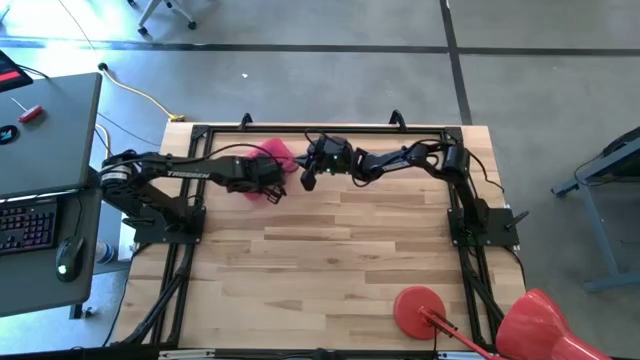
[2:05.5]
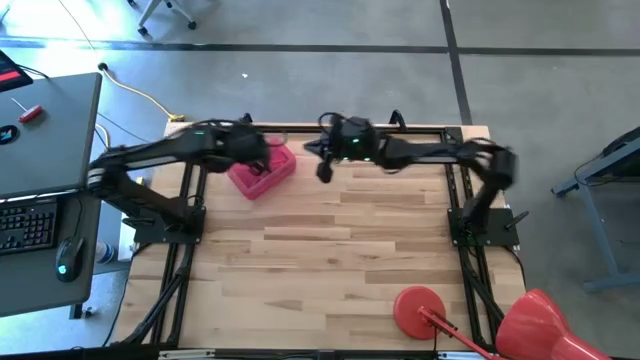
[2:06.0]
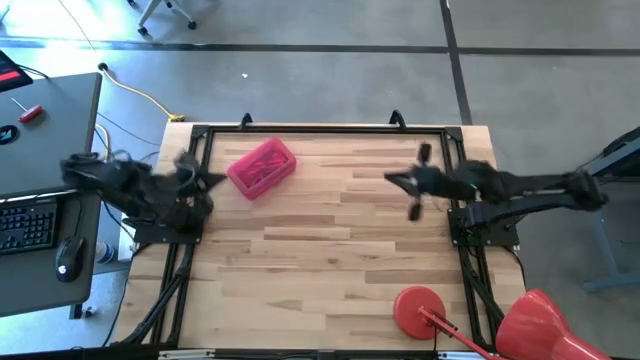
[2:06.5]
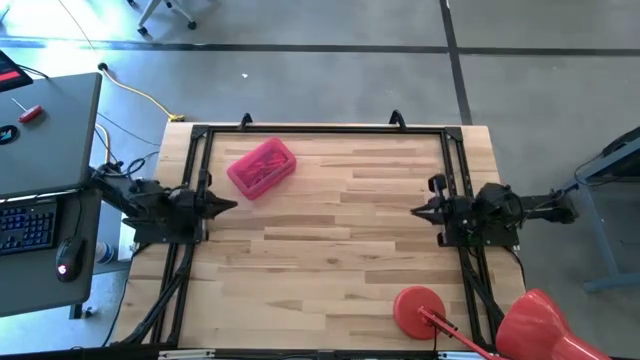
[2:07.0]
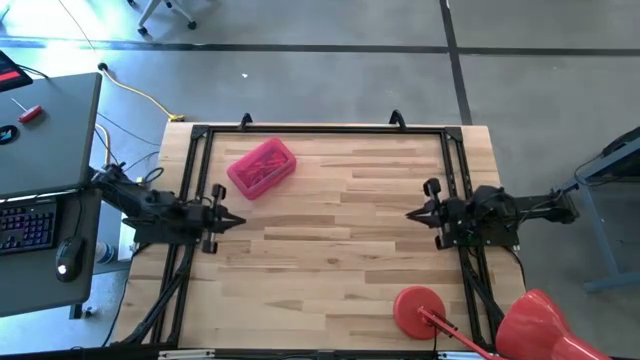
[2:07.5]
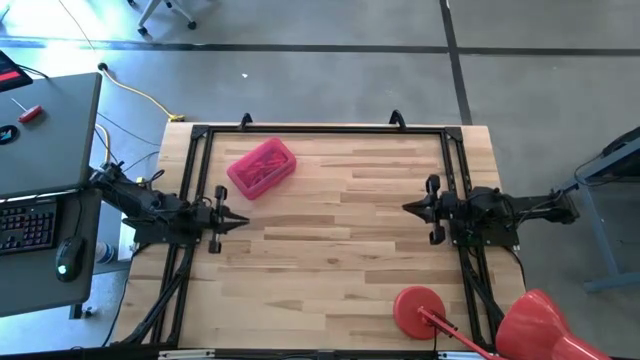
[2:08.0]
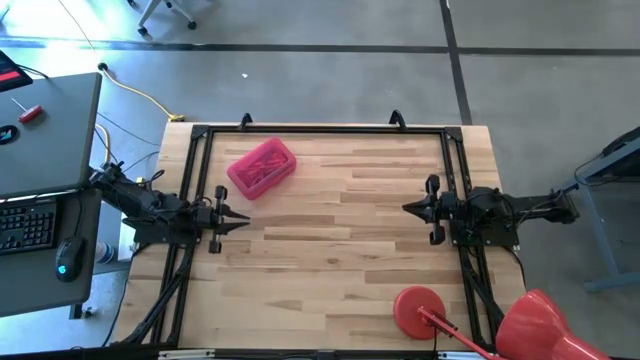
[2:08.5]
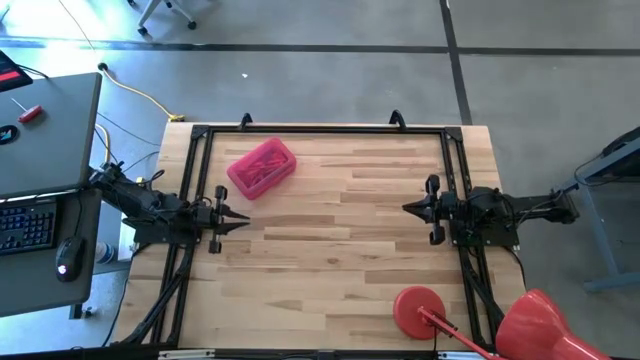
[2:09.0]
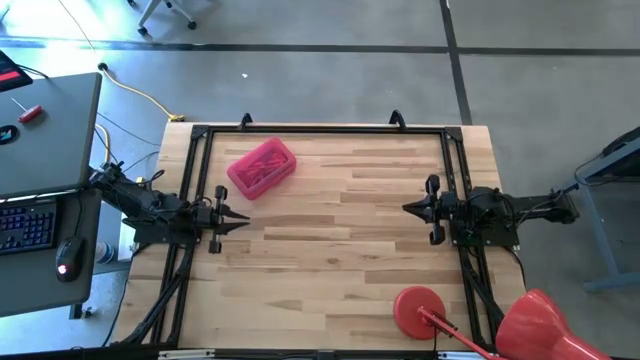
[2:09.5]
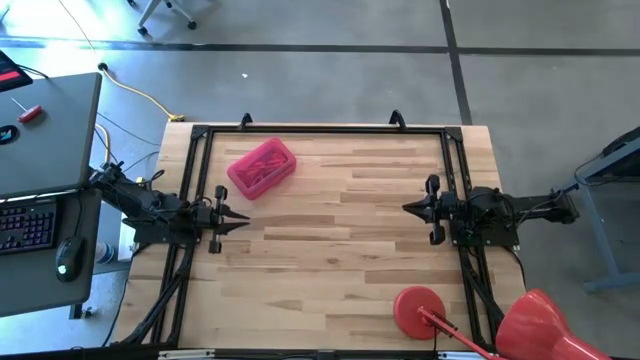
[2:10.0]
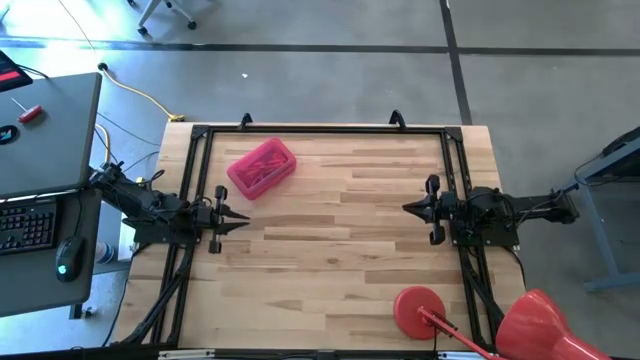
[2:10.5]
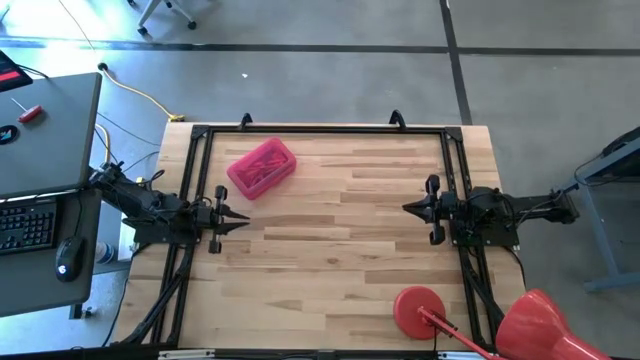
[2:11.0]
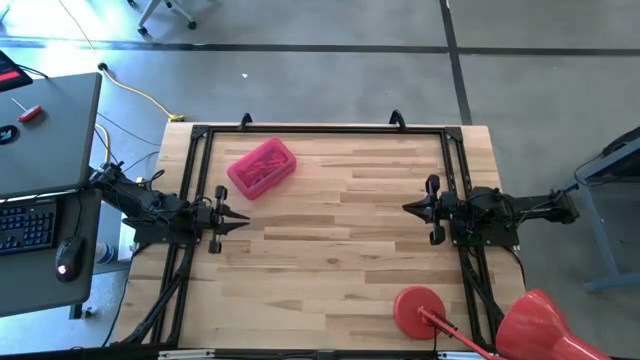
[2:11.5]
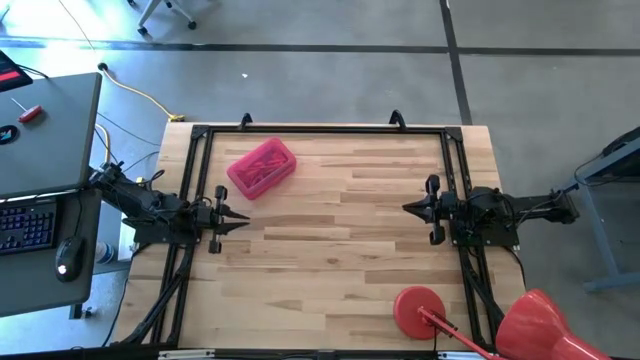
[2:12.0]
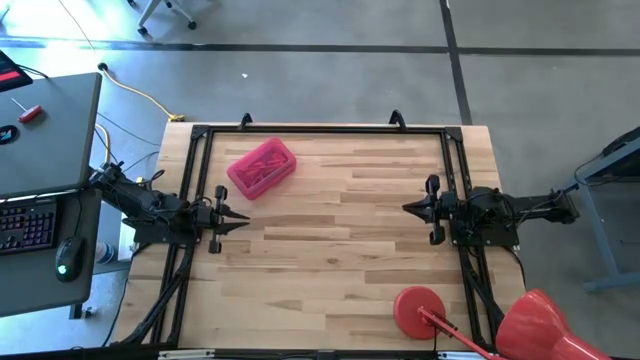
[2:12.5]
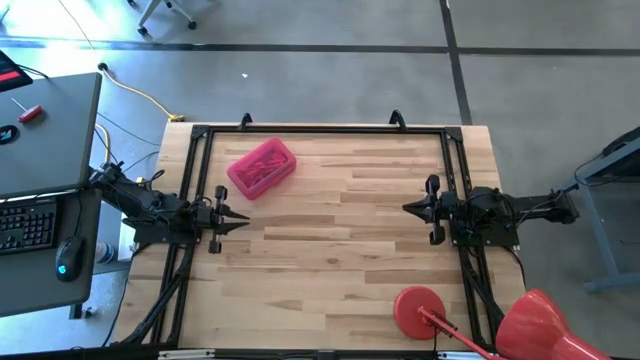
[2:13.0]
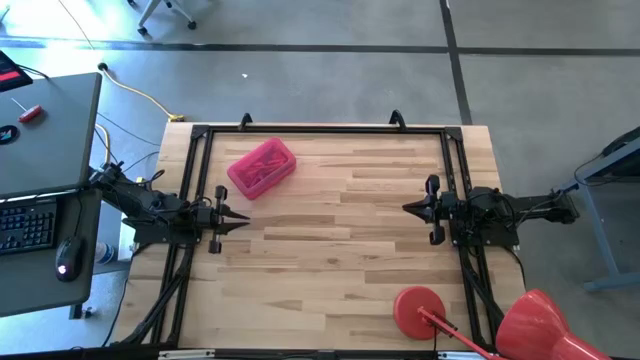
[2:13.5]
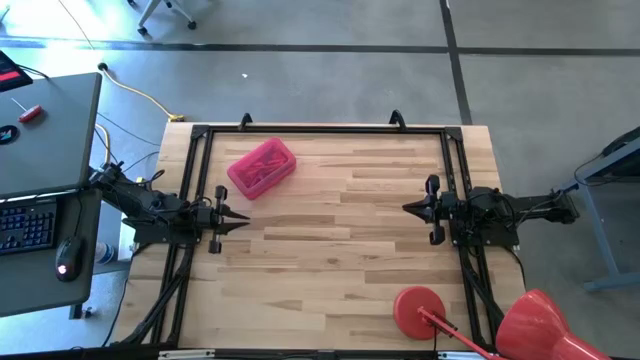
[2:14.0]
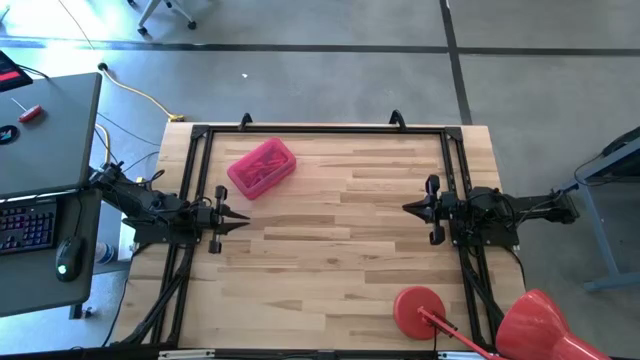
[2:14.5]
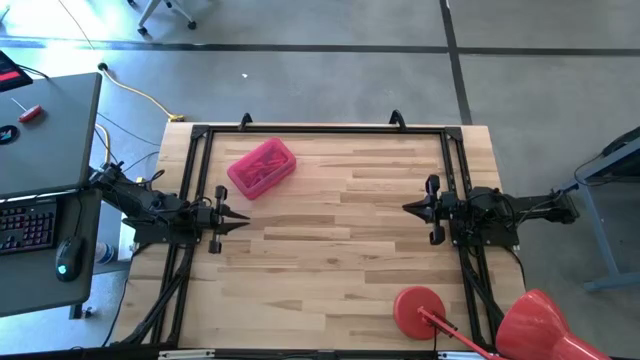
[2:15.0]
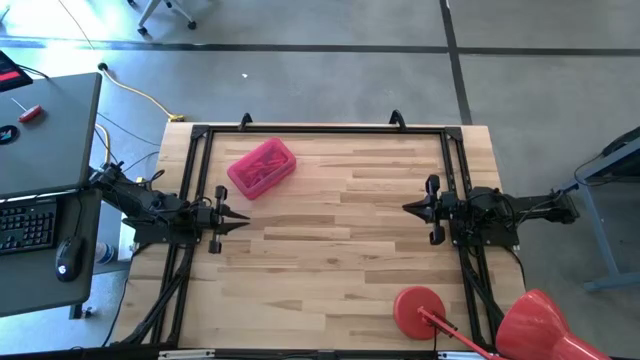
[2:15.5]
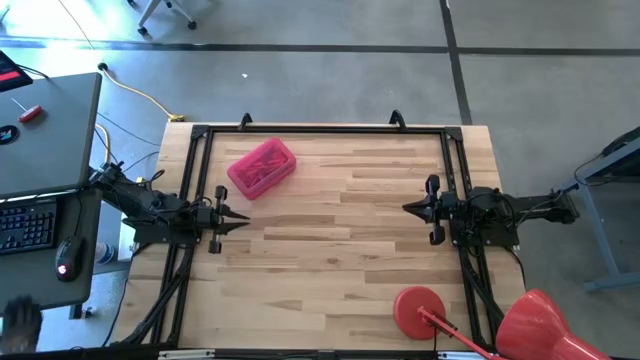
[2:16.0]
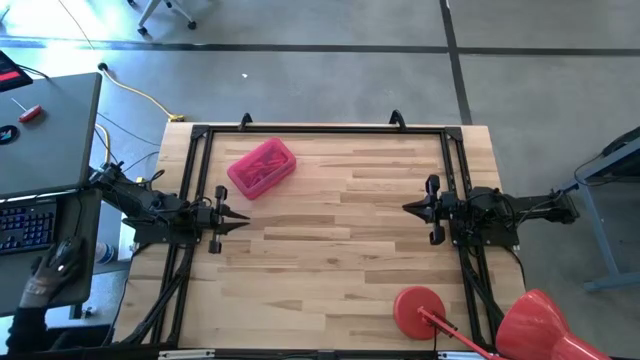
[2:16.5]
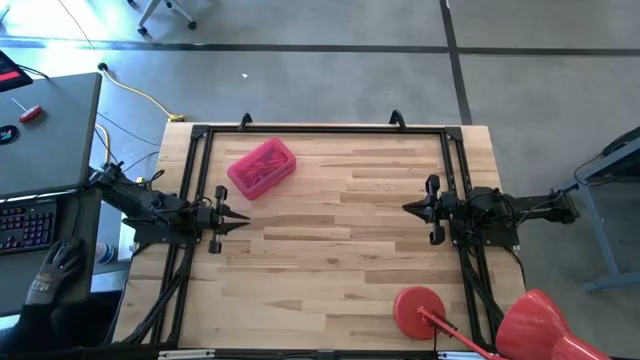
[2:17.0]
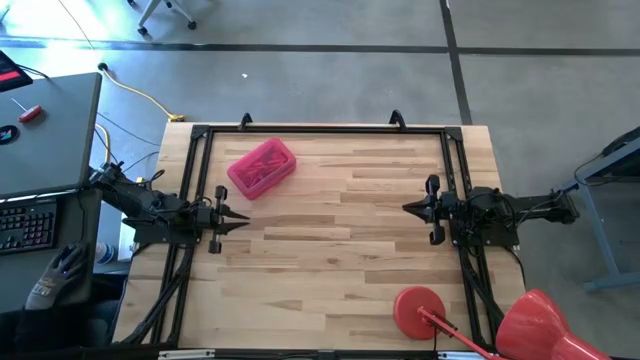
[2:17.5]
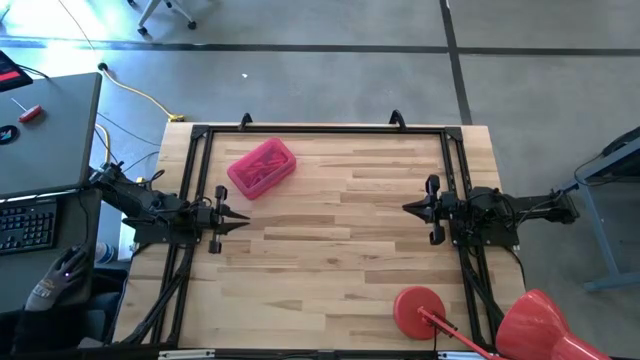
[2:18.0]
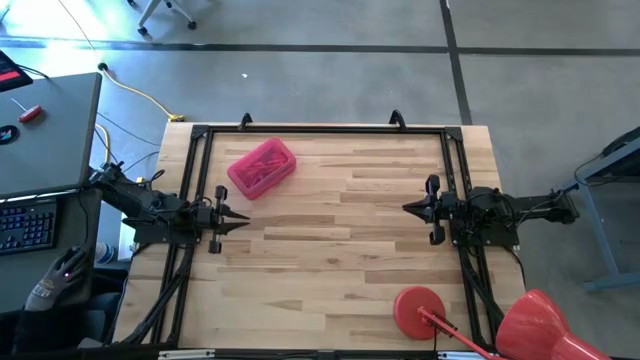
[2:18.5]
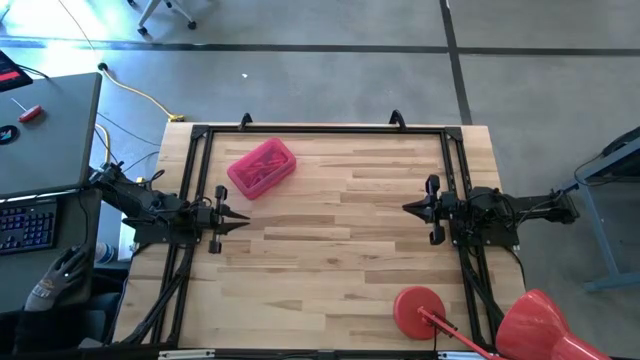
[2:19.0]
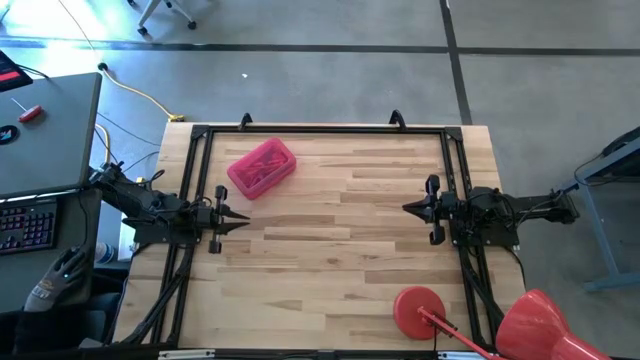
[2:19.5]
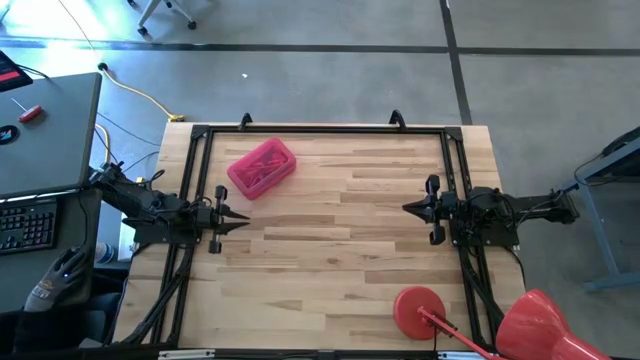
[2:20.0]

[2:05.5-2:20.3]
Task: Pick & place school supplies into a supply box
Return to Home Position

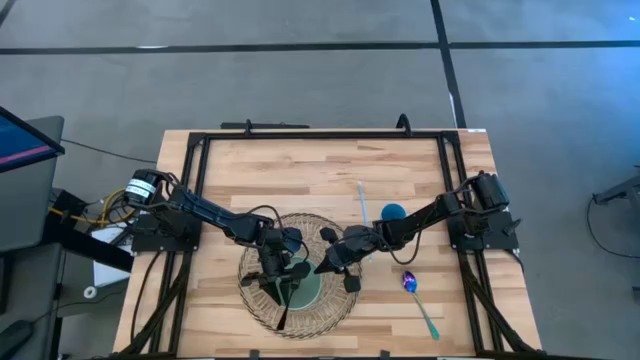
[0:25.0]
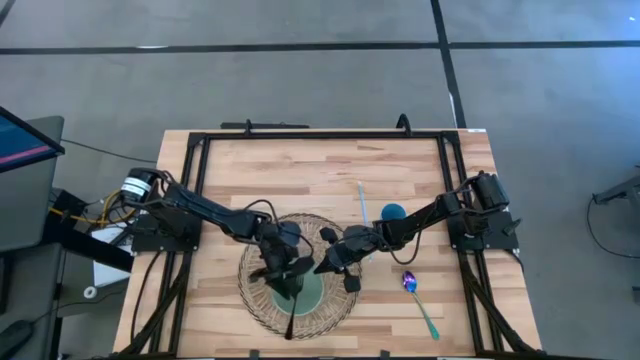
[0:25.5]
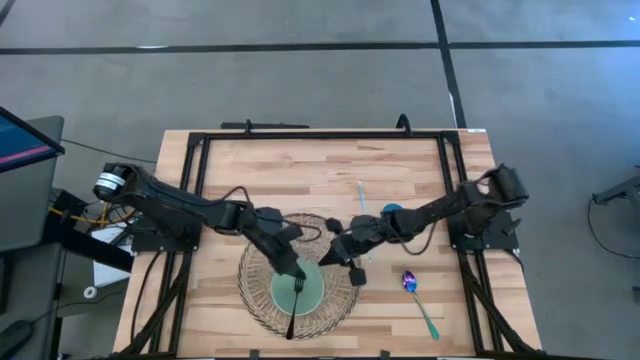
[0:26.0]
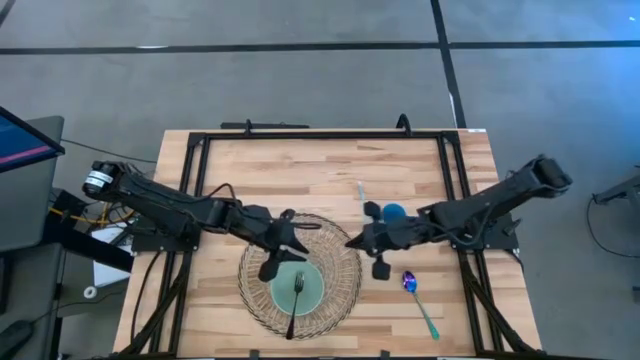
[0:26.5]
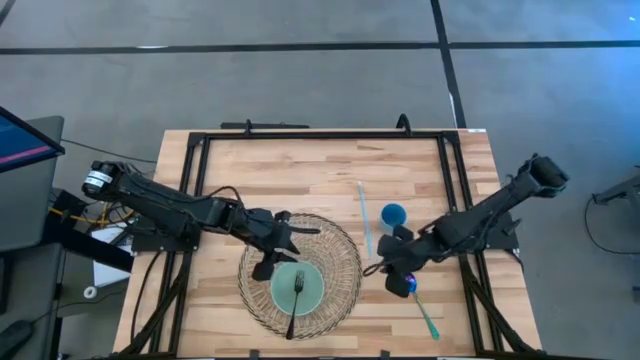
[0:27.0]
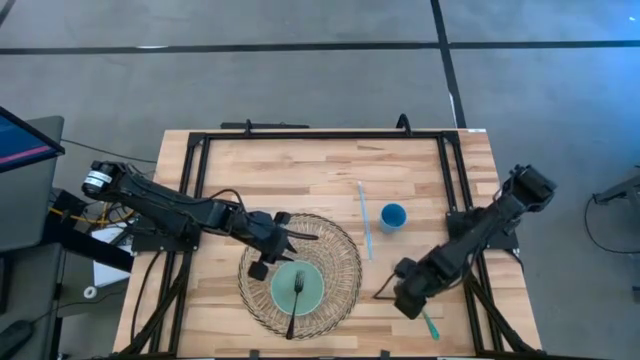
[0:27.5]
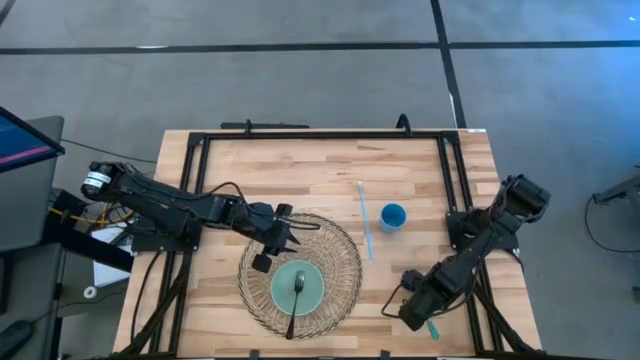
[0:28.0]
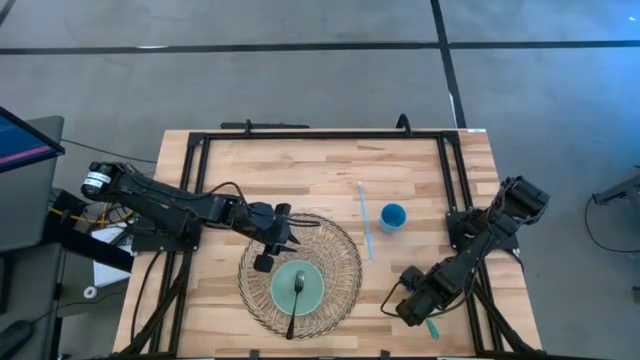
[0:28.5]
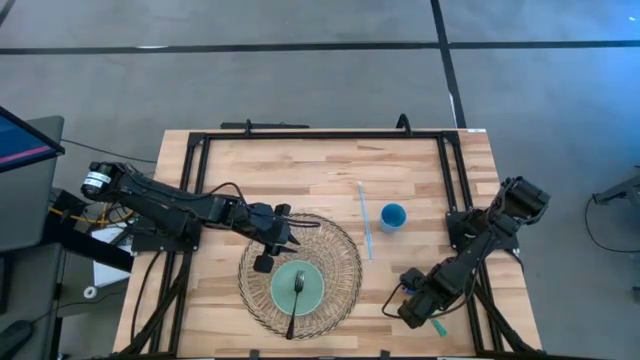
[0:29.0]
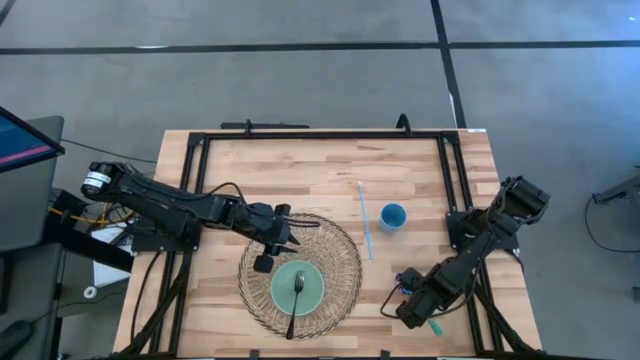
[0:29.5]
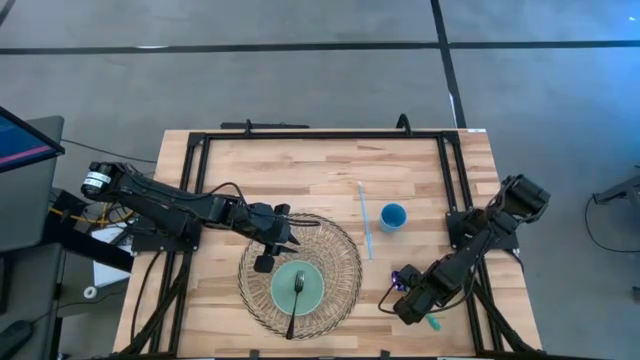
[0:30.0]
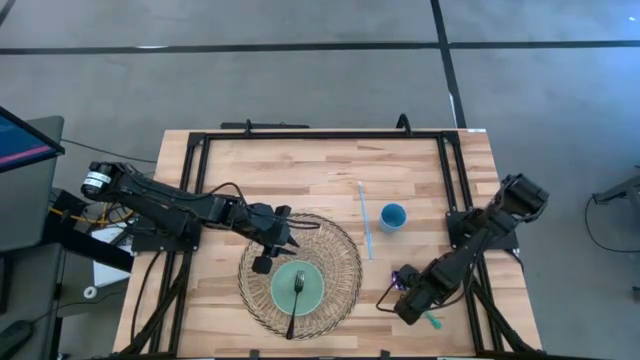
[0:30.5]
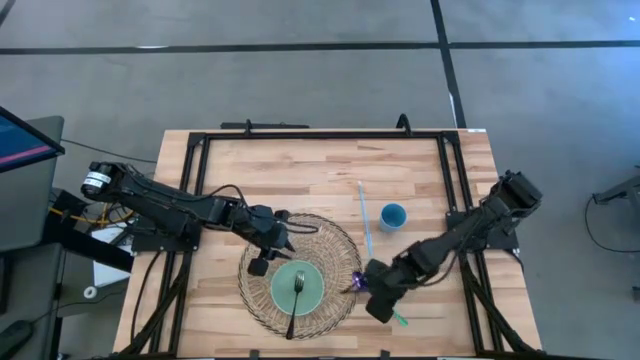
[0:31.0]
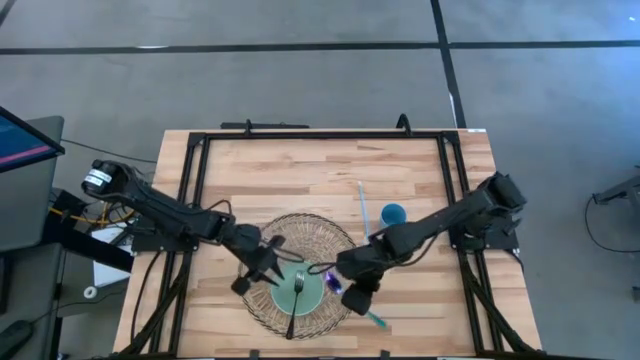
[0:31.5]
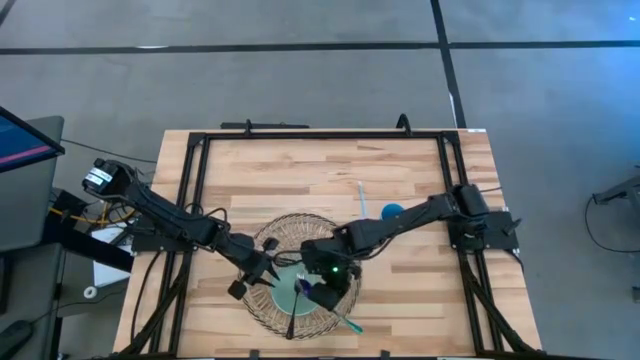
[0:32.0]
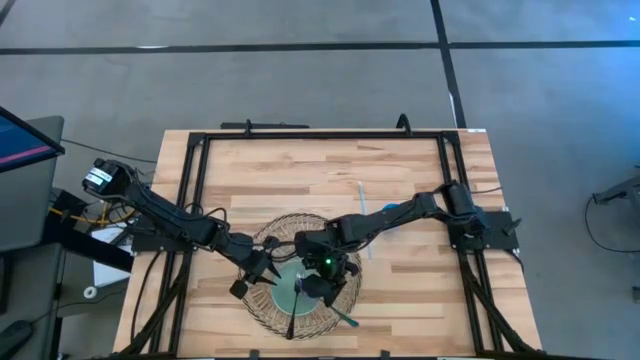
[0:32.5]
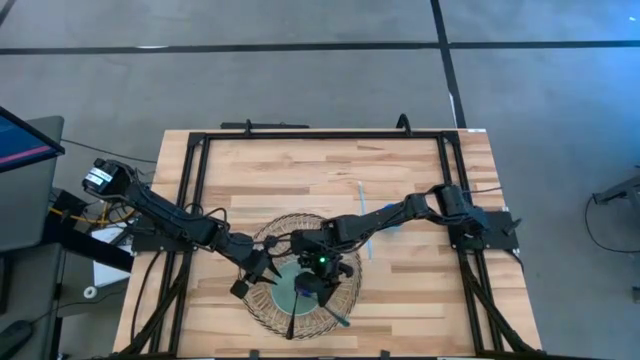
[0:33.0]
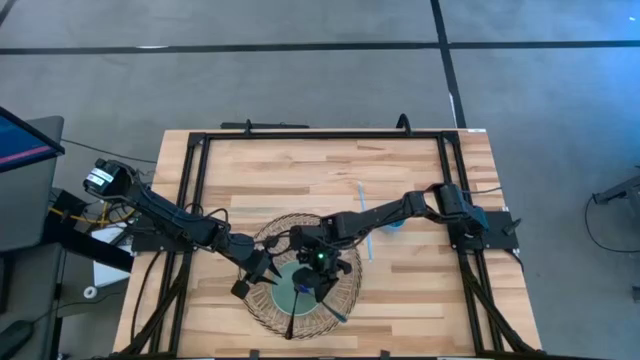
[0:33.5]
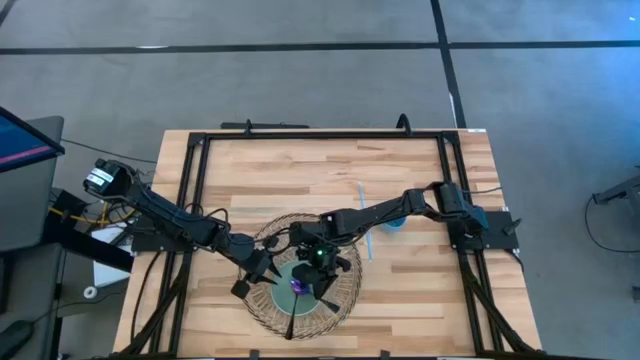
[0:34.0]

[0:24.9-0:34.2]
Task: Pick & Place Utensil
Put the blue spoon into the green bowl to the left of the black fork
